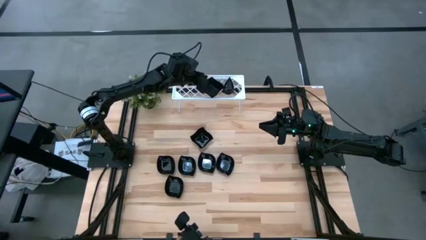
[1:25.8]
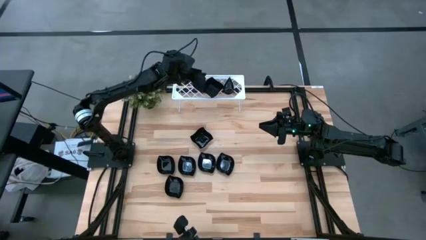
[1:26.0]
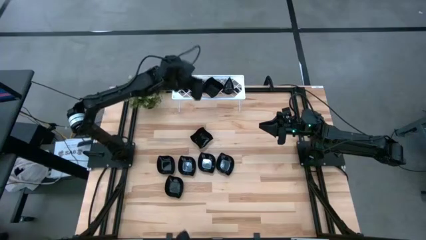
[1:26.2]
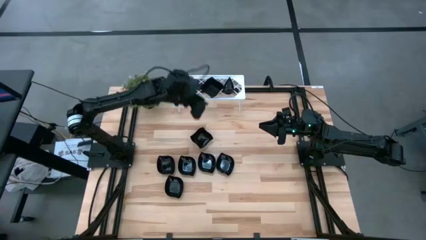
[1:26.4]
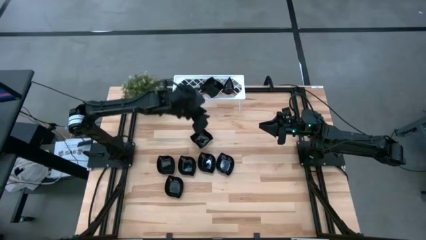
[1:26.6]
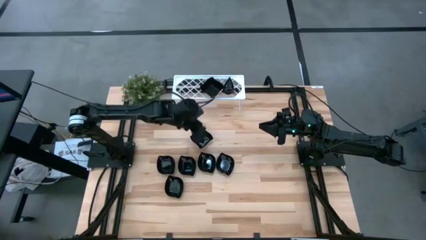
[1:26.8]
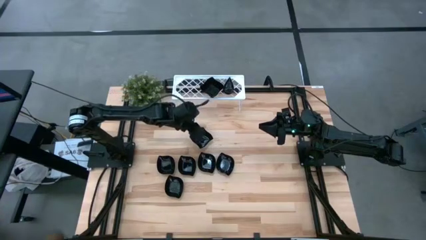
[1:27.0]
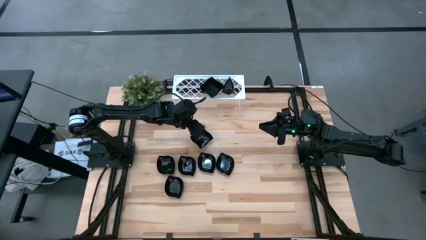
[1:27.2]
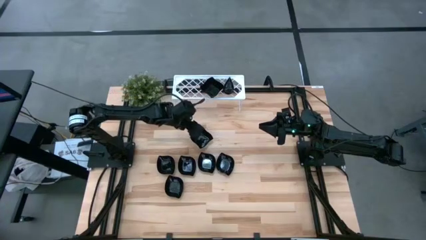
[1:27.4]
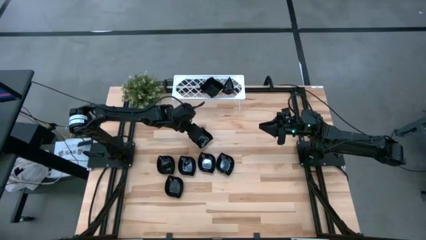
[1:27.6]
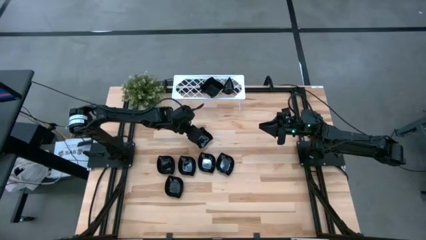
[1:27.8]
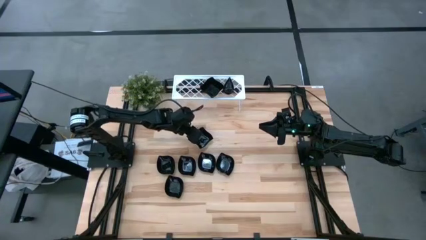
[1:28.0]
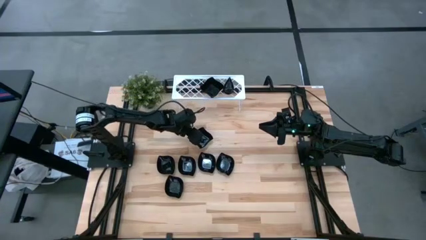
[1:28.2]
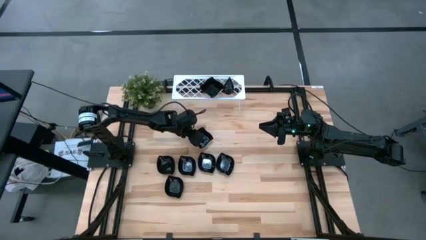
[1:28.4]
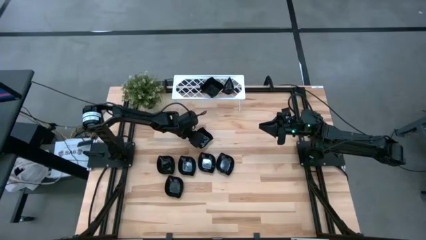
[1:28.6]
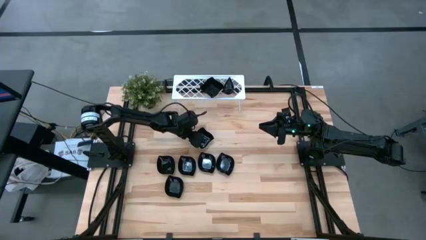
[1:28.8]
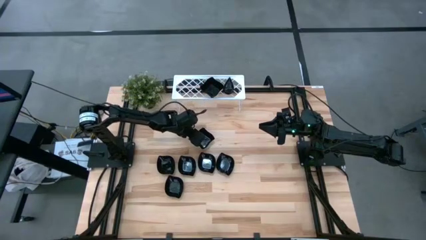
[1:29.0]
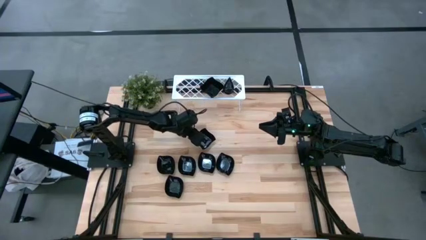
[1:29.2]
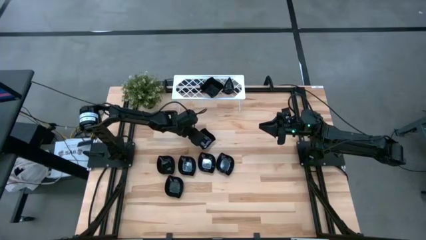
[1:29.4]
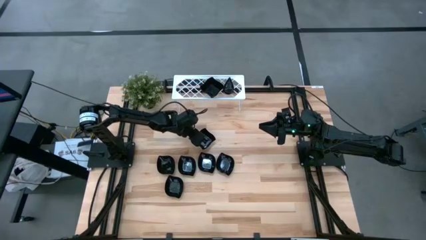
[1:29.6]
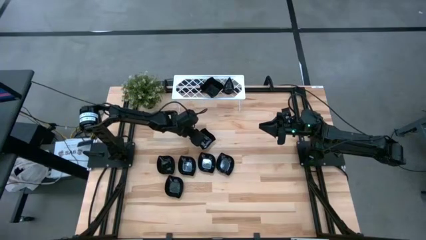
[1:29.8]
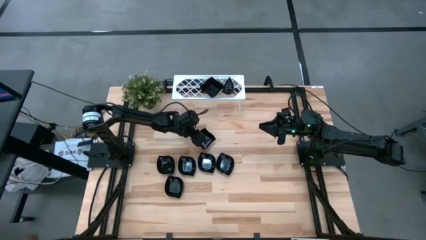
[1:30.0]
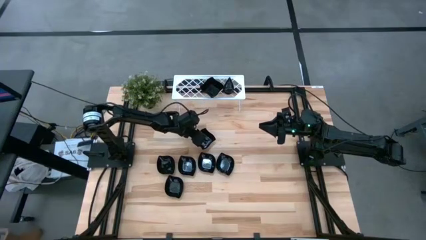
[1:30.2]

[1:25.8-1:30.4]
Task: Pick & Place Mini shaped plates
Stack the distorted square plate on top of the distorted square plate on the shelf

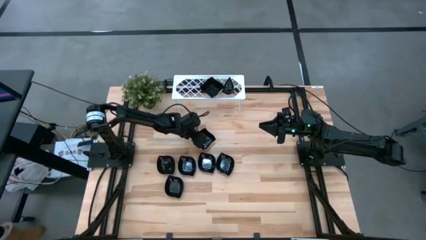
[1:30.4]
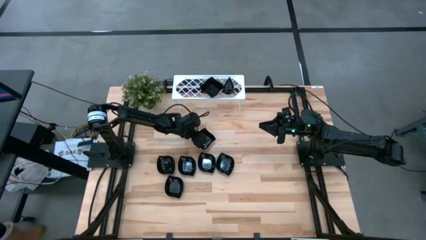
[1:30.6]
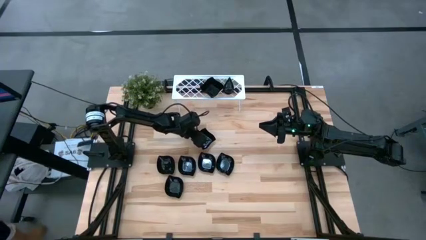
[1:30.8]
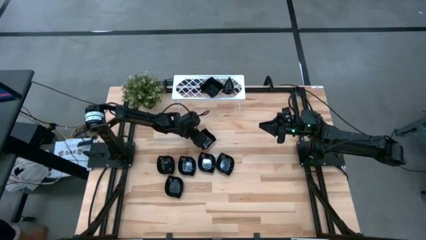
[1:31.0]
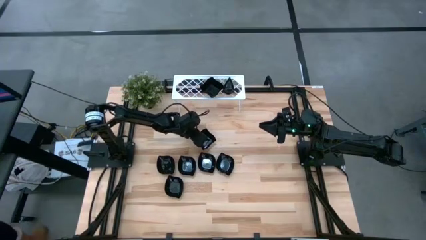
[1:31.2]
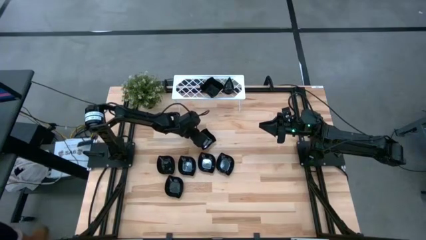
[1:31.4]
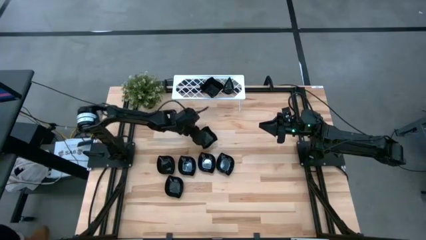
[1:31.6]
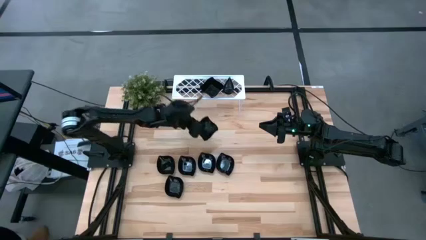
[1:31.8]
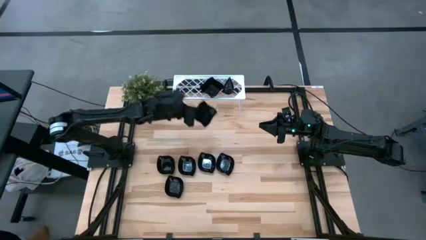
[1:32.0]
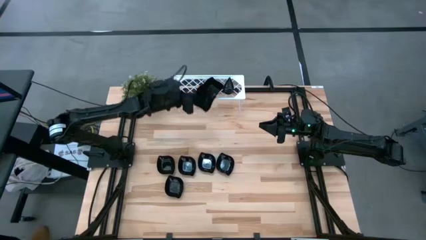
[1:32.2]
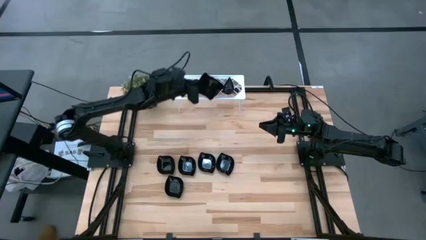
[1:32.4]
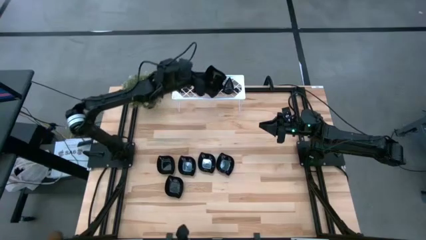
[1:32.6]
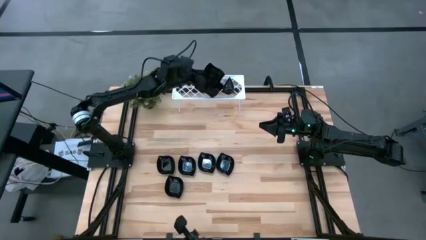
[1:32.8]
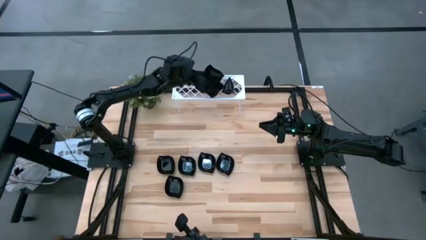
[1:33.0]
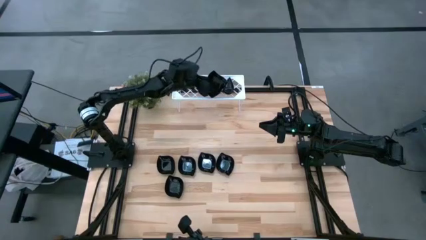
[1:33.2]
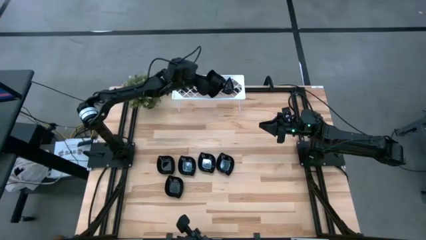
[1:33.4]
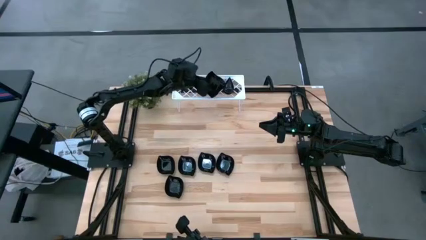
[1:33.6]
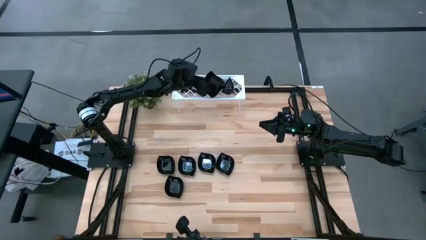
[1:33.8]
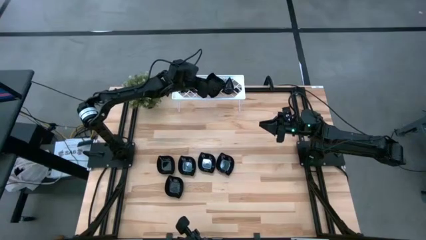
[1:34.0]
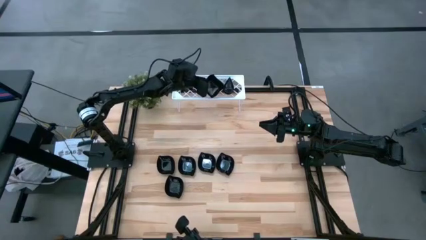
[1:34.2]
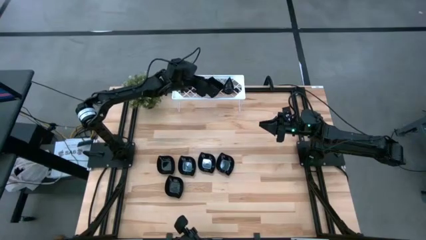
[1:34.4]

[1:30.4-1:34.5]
Stack the distorted square plate on top of the distorted square plate on the shelf

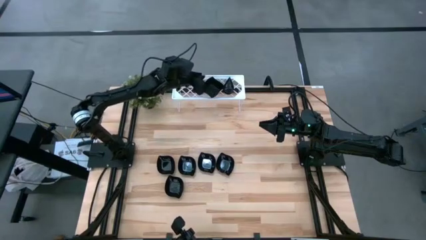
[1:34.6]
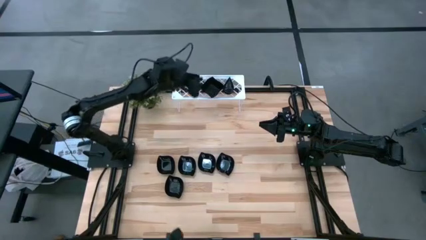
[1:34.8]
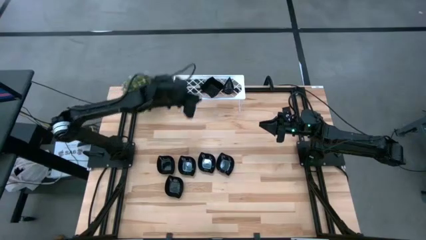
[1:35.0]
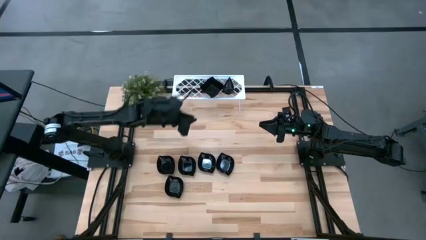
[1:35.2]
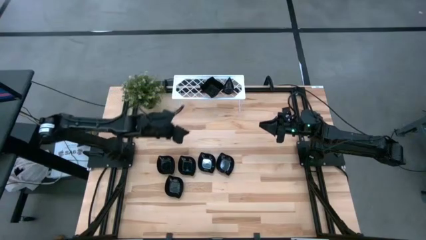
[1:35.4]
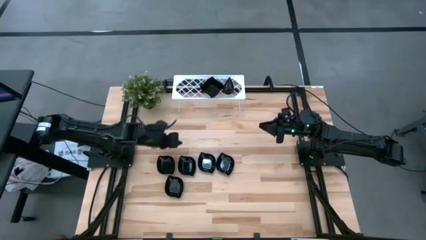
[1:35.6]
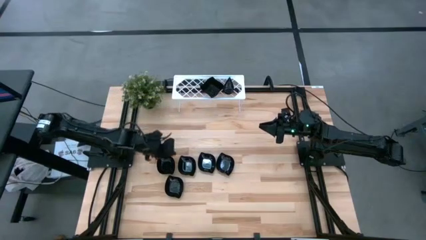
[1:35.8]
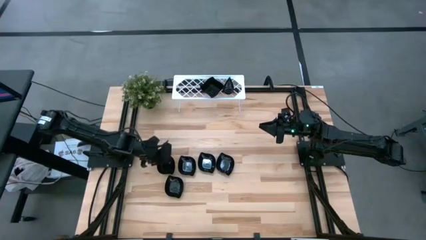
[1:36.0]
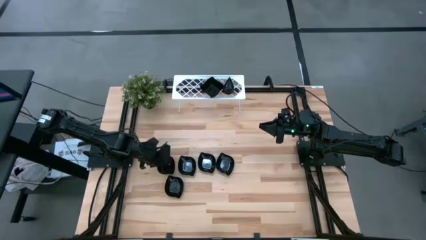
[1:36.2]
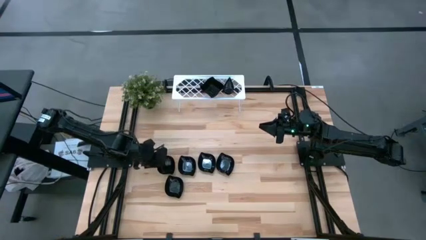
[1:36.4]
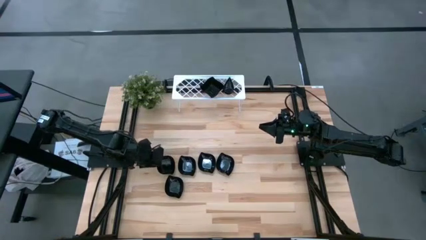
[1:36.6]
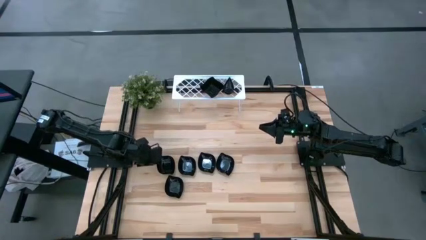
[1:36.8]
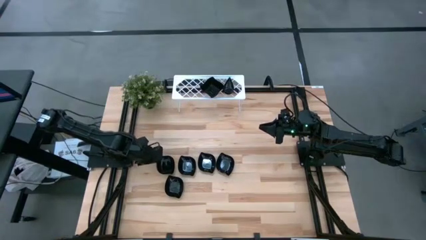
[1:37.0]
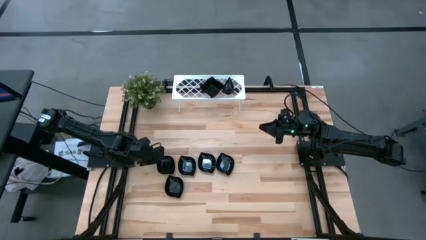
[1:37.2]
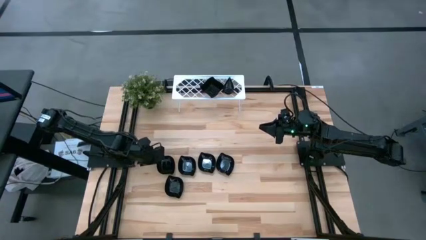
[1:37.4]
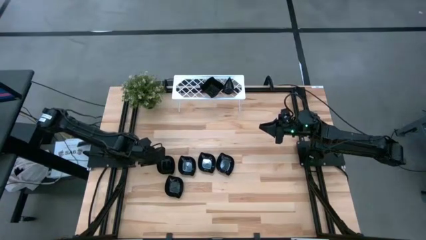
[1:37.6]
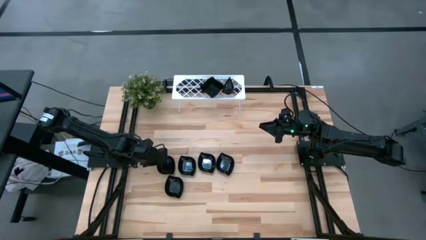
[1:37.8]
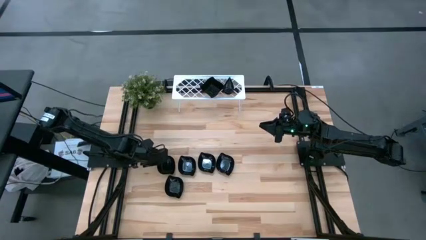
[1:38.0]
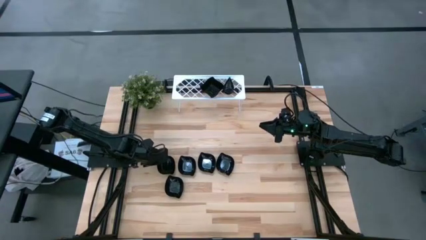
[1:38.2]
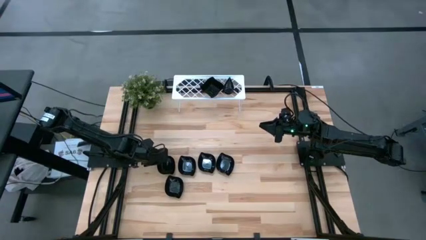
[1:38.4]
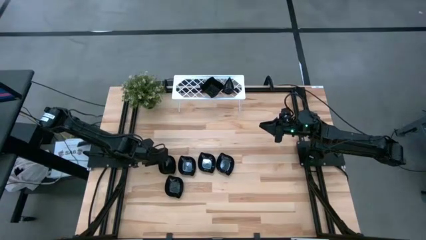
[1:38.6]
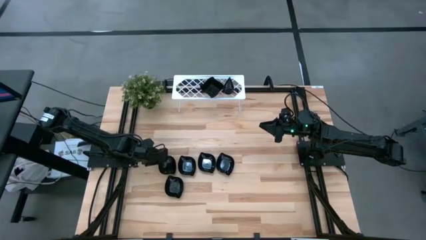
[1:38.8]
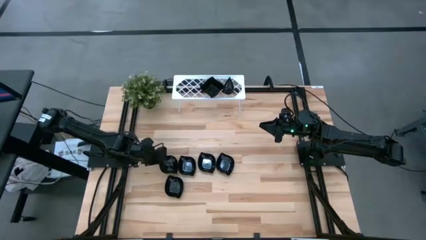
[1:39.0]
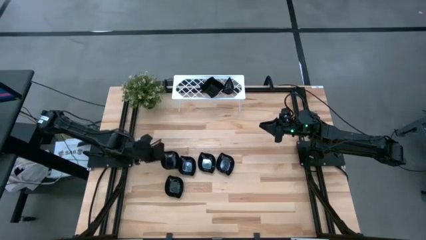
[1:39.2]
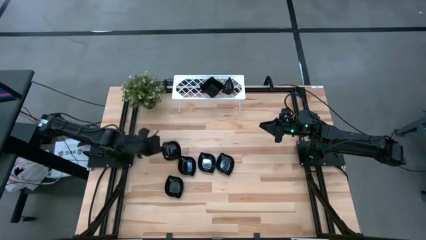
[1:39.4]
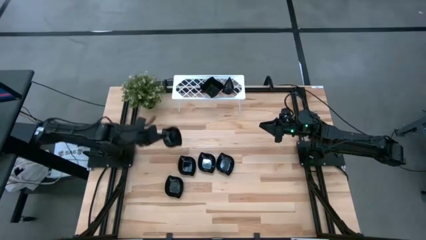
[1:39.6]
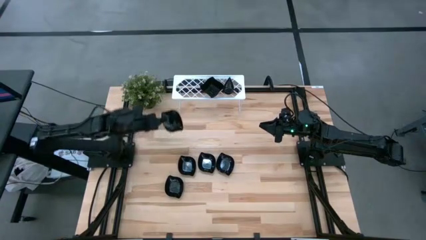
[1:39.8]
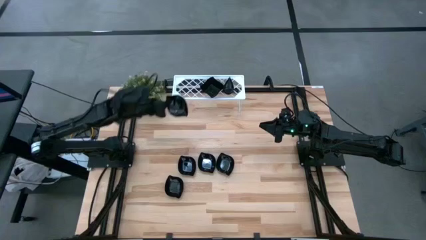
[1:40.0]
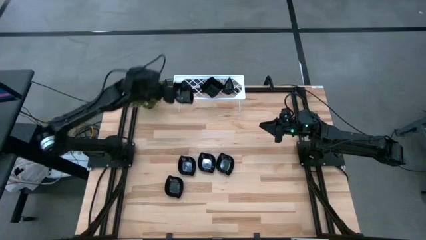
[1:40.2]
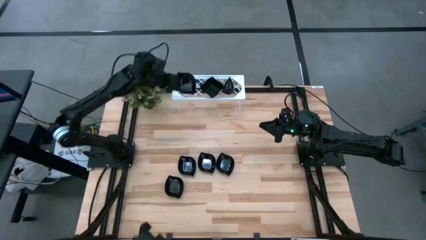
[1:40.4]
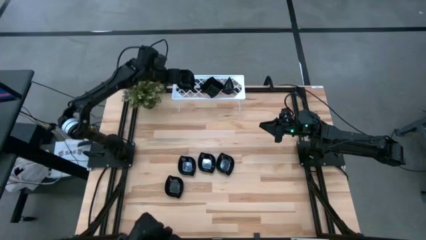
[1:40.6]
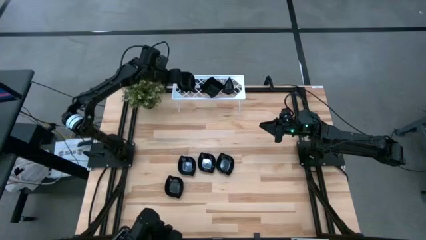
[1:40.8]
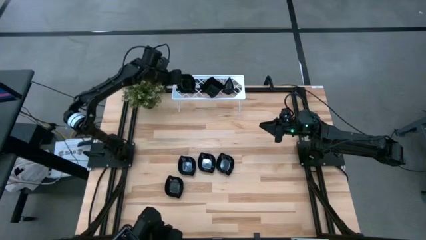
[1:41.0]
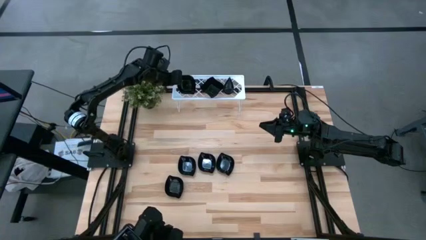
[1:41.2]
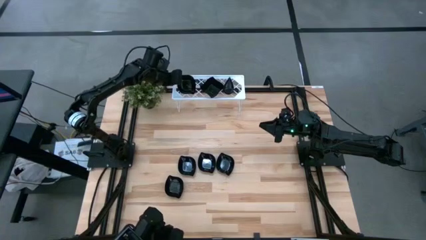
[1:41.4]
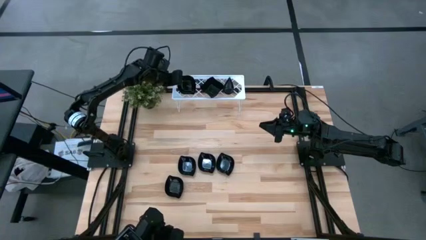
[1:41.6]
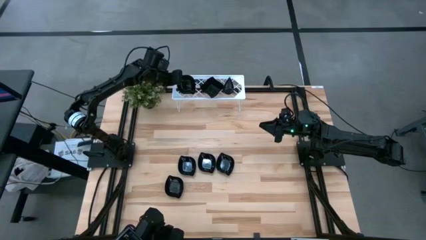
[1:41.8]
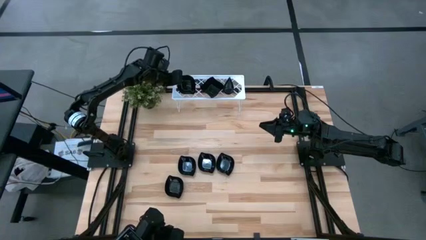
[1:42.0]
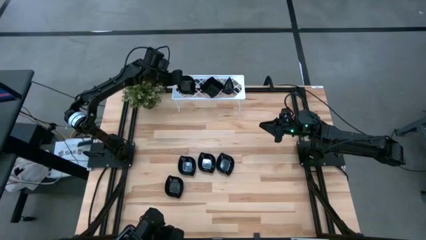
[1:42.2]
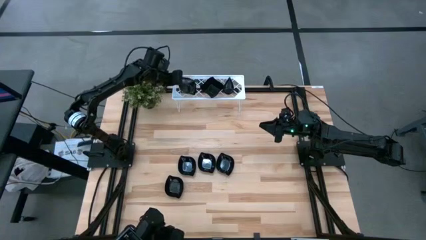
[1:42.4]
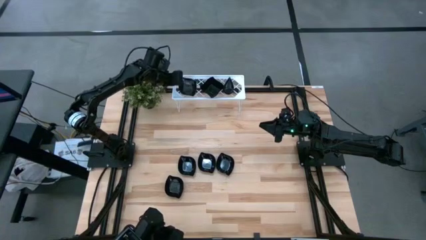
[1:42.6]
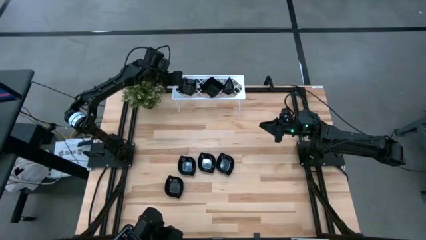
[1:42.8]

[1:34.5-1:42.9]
Put the leaf-shaped plate on the shelf
